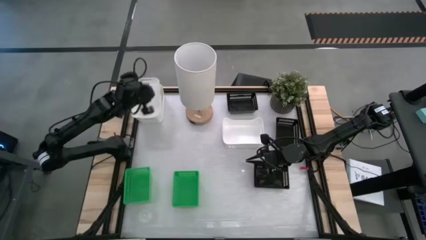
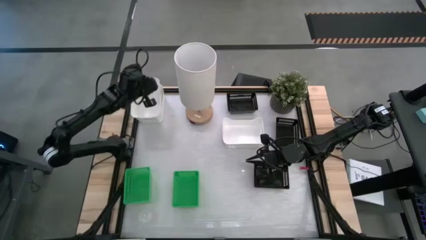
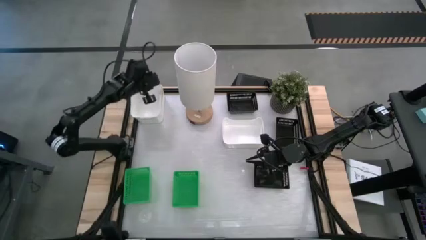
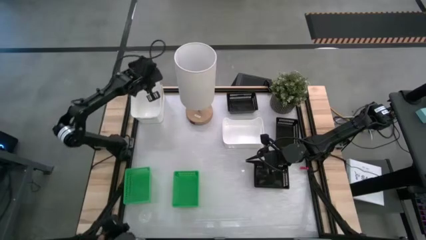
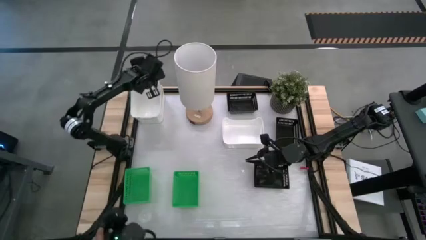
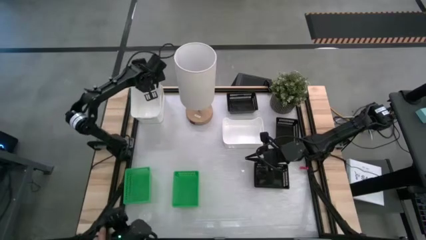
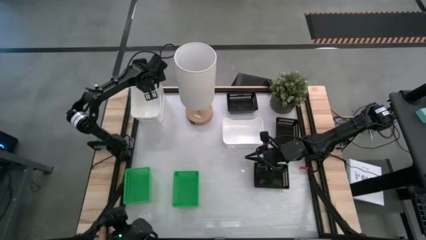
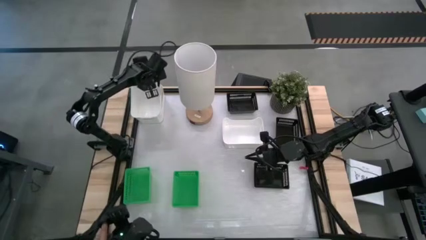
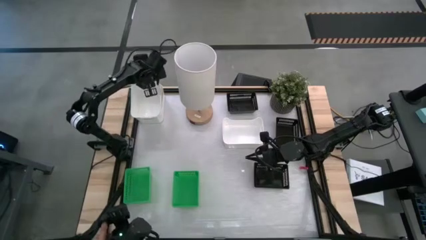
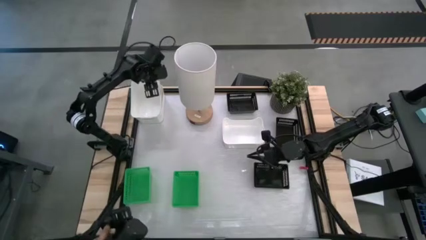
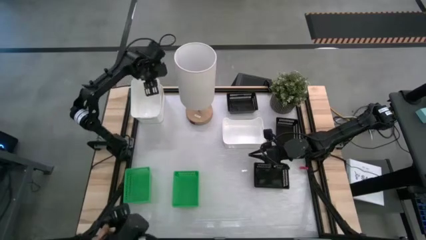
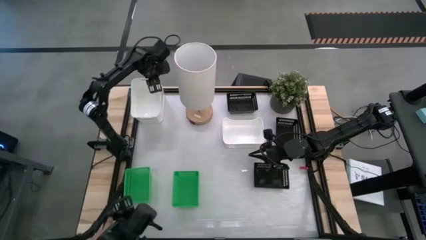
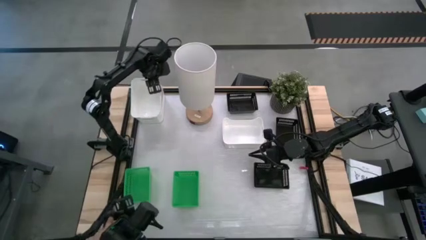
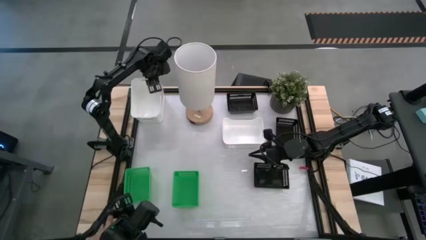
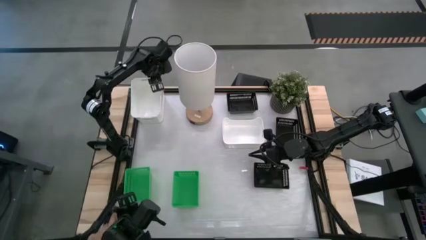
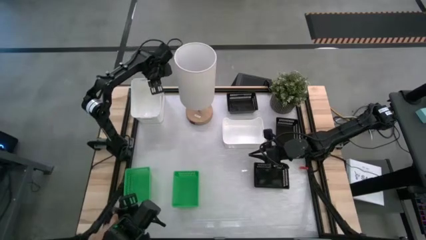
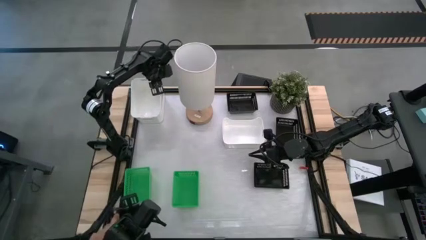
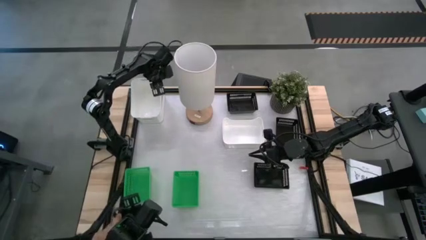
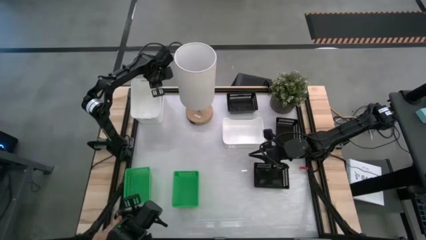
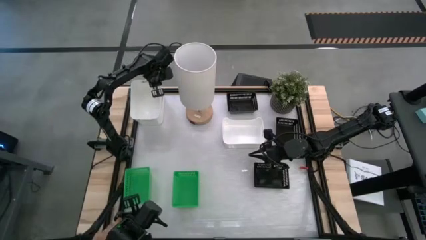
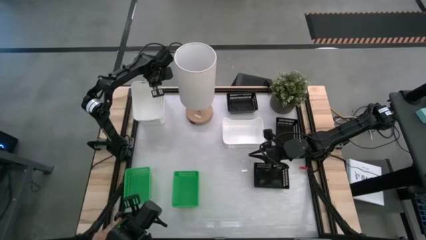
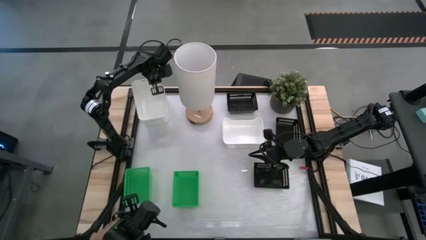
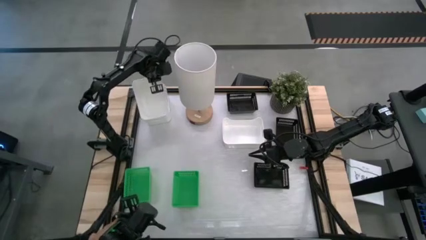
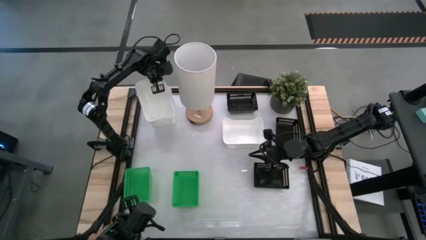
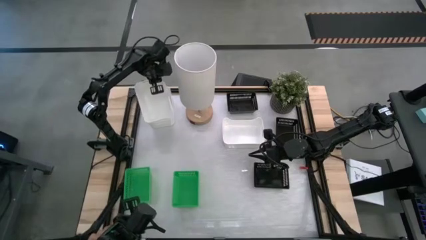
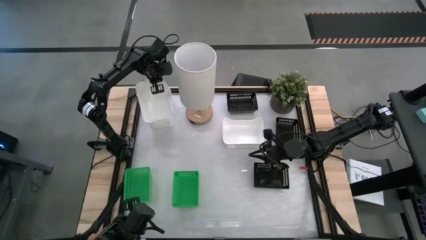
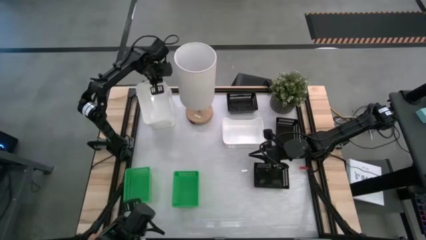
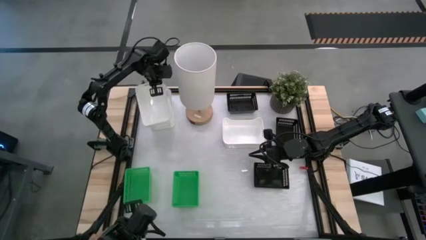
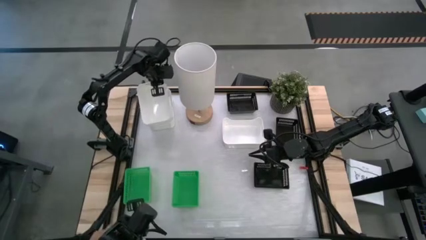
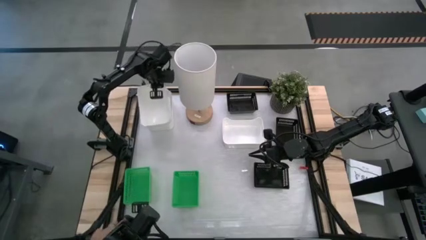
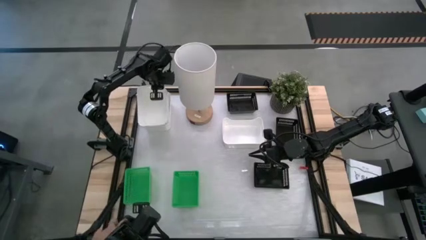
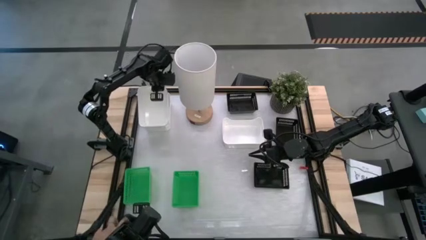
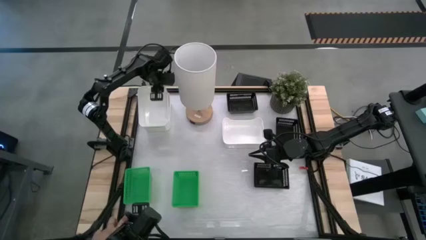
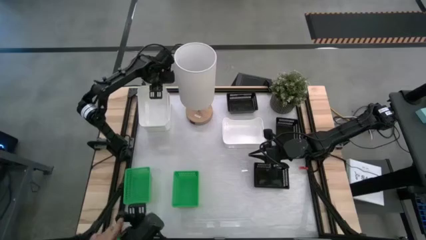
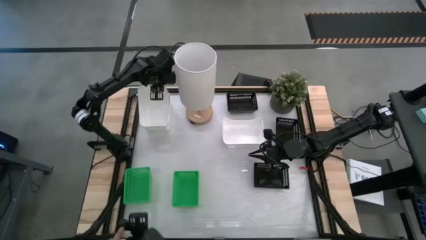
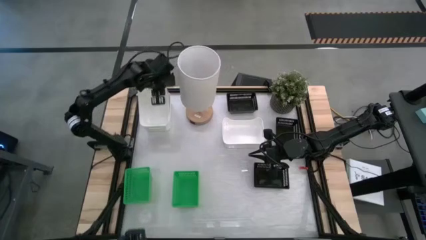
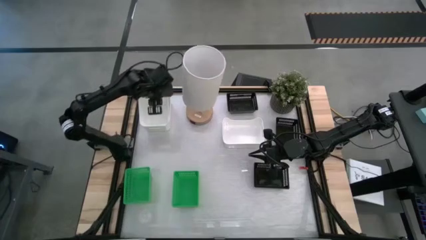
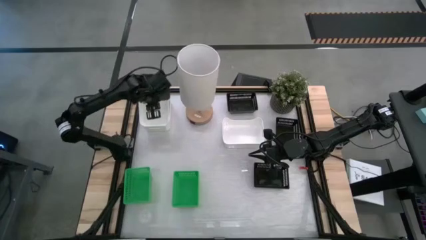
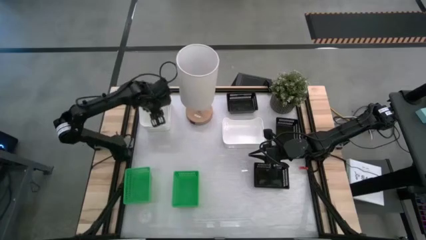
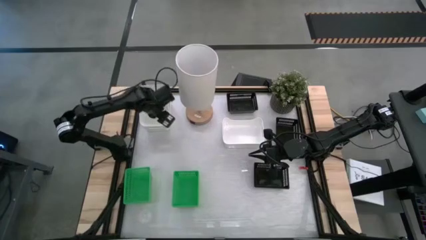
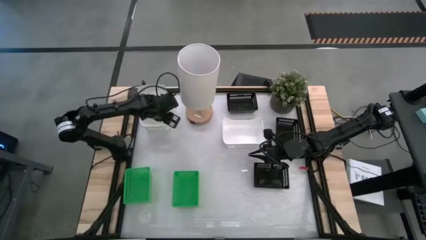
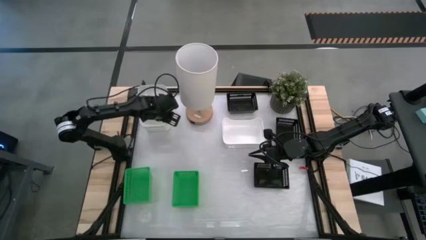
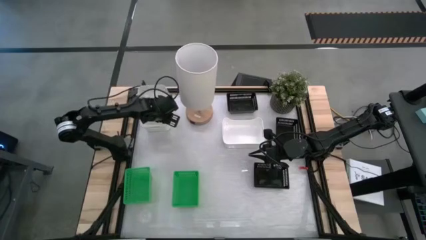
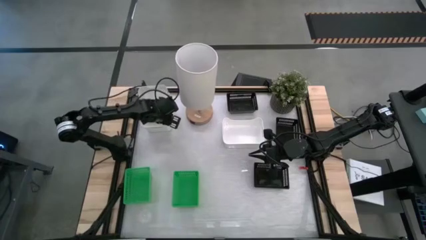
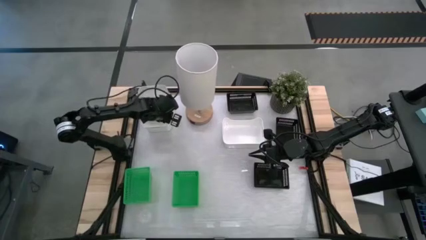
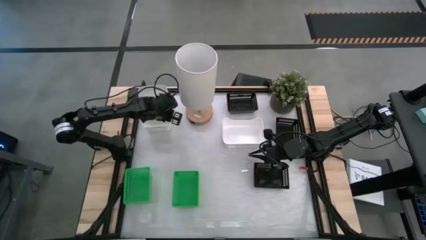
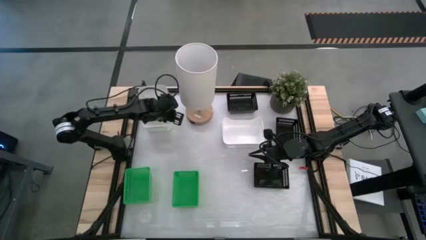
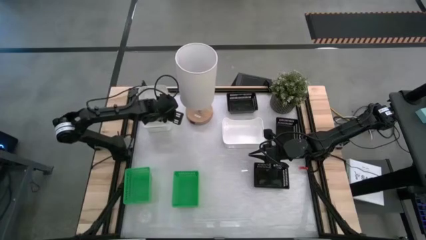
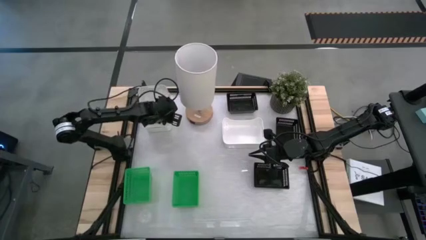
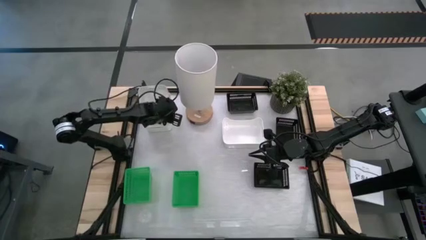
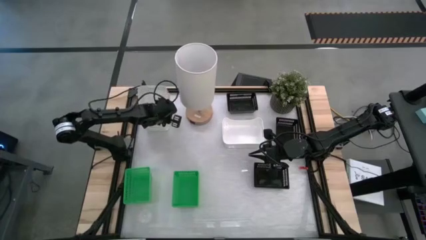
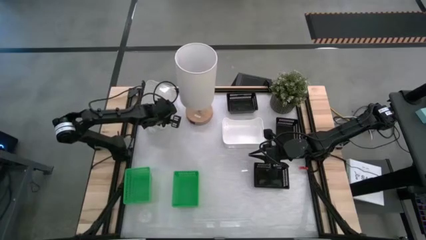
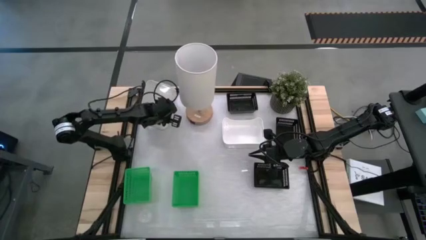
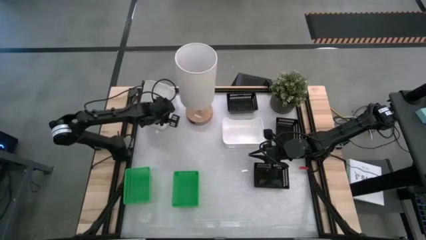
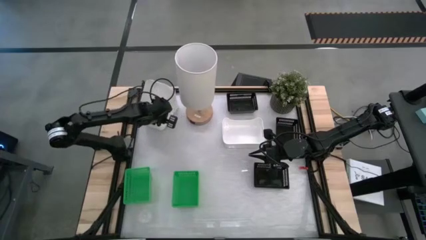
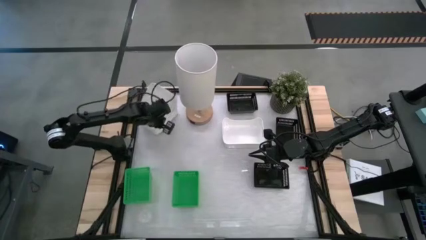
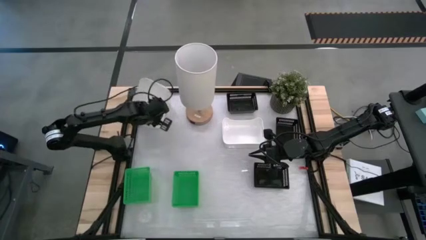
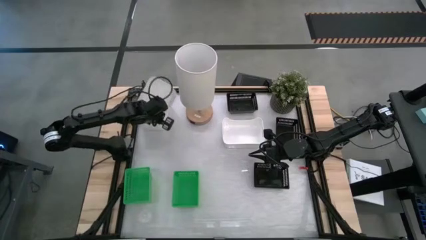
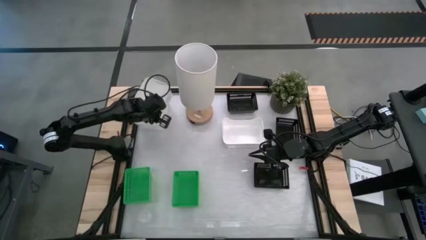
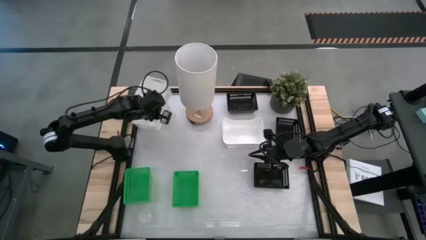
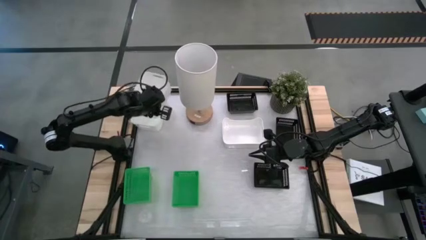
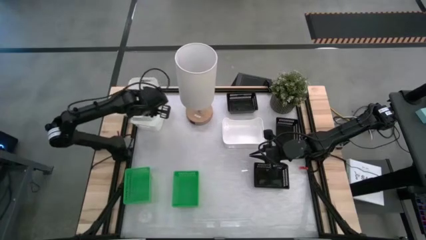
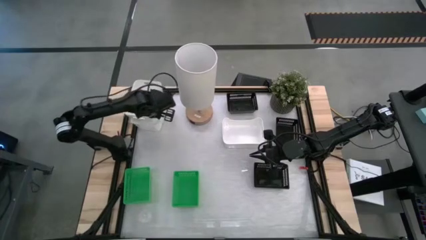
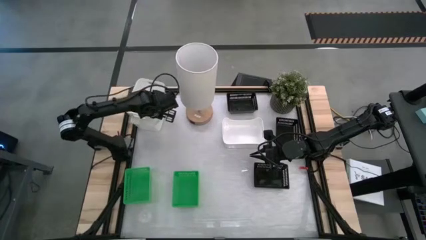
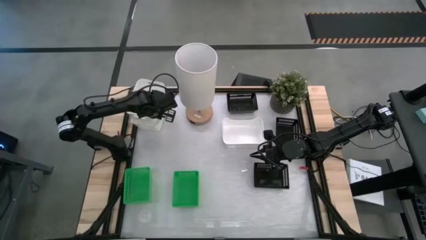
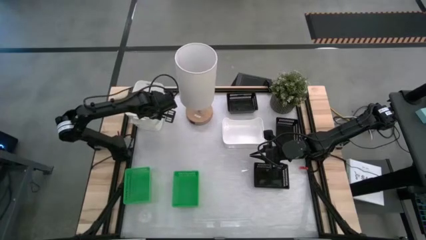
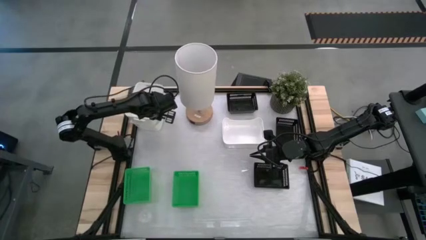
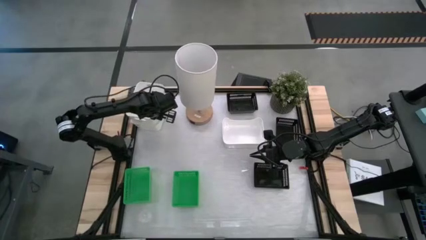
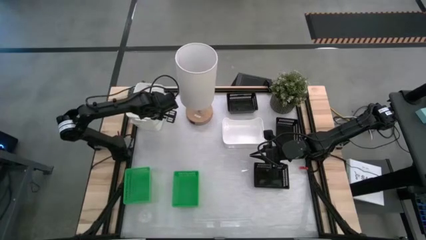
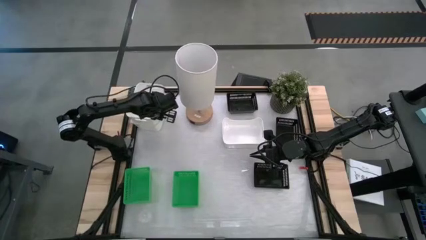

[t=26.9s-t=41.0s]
Stack the bottom left white bin on the top left white bin

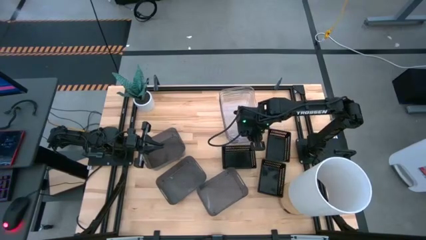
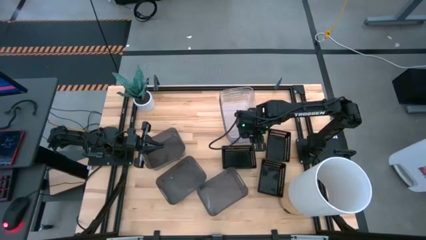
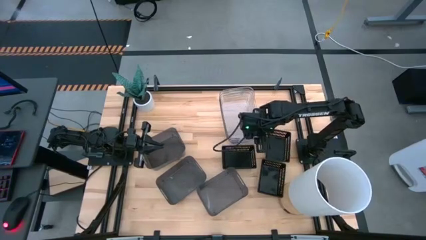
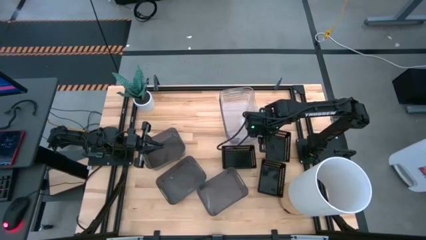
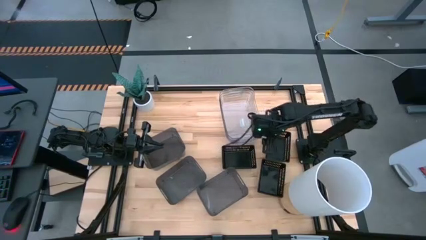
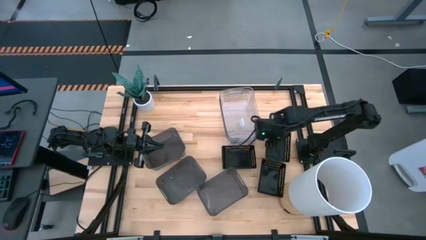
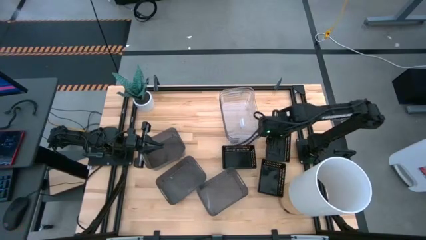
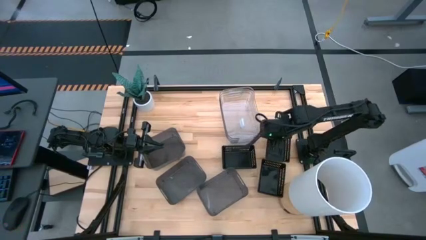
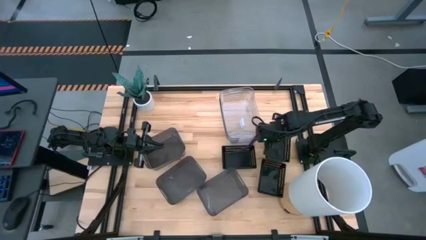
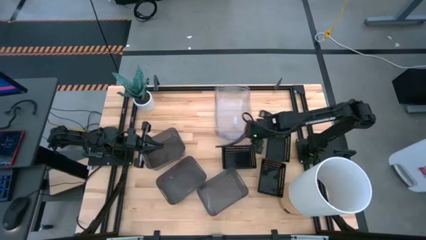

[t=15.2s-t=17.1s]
Adjust the transparent bin
